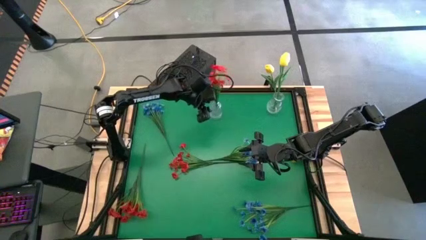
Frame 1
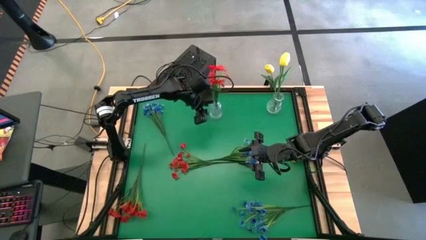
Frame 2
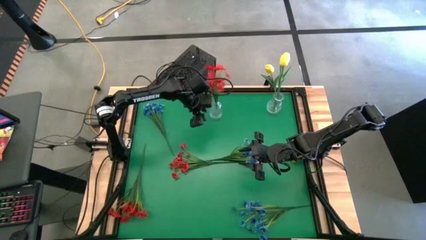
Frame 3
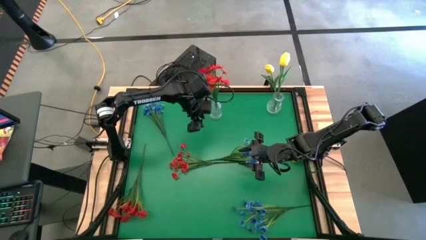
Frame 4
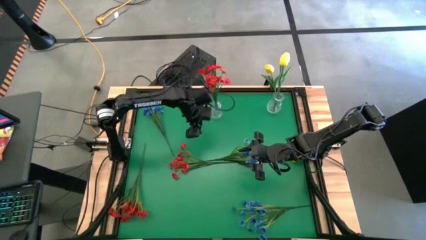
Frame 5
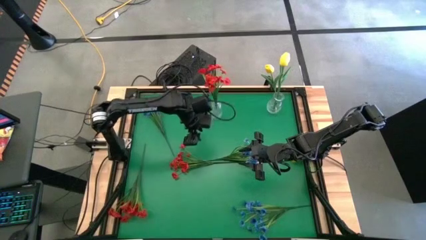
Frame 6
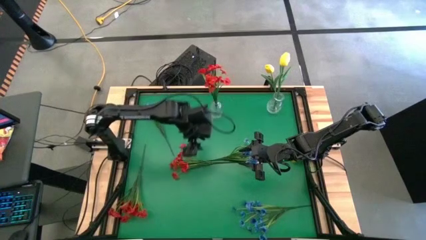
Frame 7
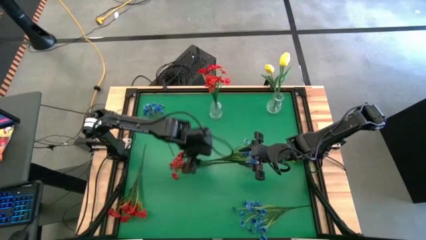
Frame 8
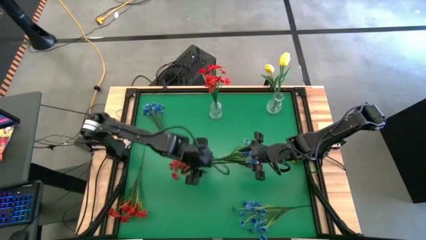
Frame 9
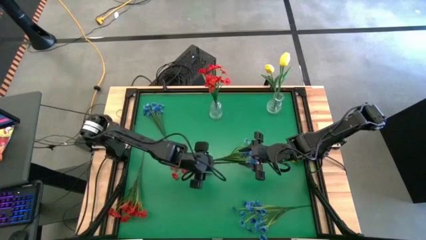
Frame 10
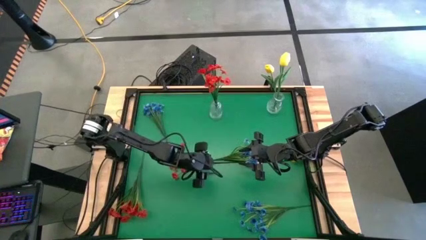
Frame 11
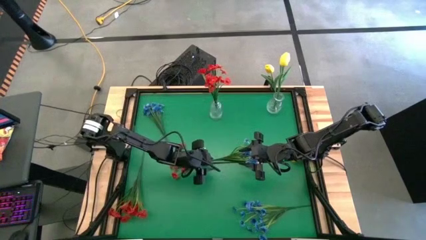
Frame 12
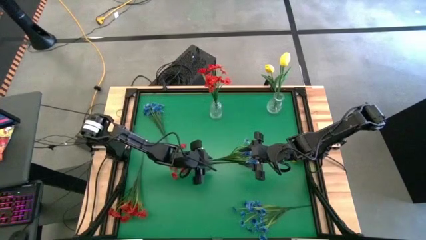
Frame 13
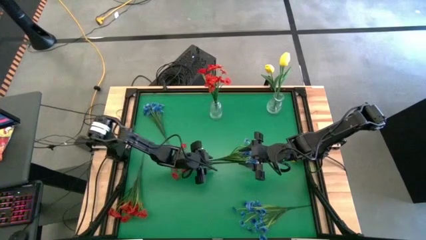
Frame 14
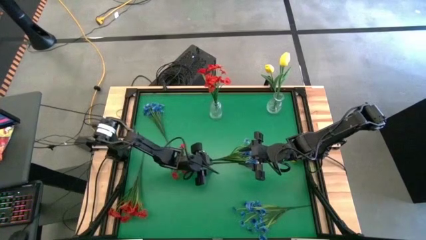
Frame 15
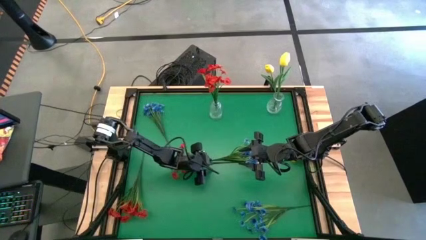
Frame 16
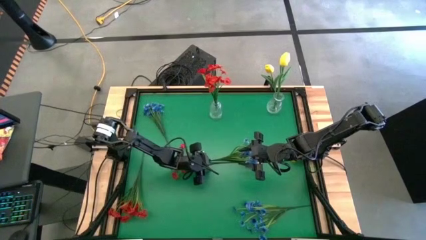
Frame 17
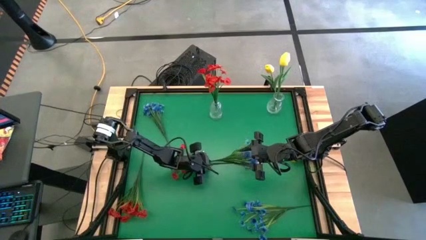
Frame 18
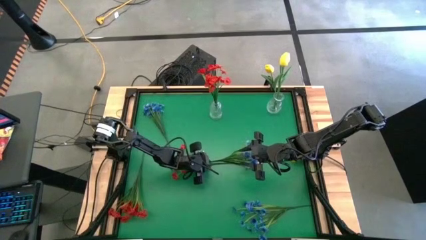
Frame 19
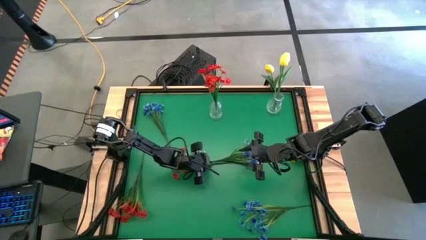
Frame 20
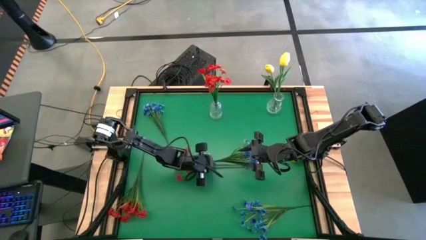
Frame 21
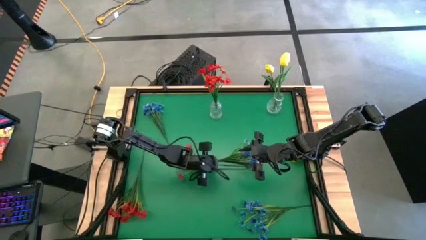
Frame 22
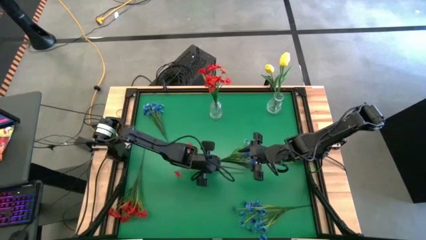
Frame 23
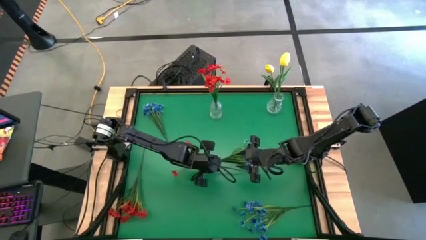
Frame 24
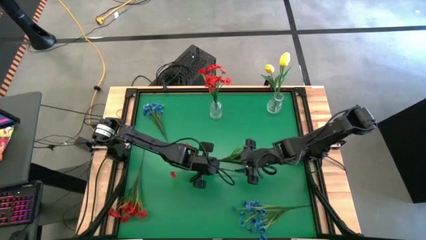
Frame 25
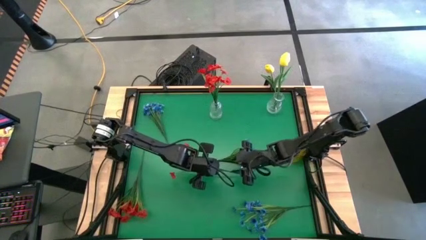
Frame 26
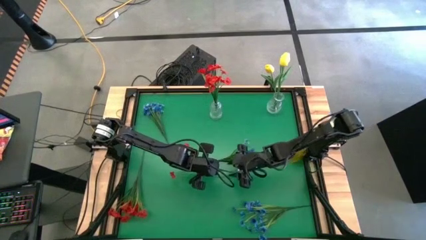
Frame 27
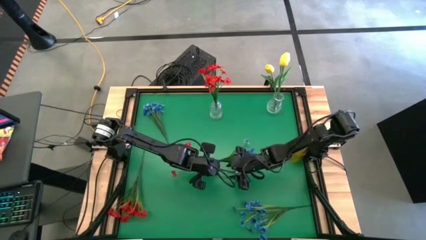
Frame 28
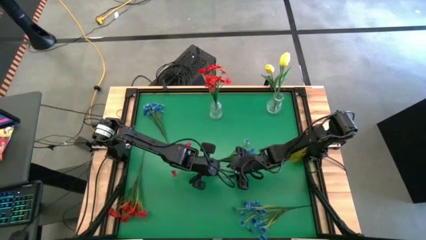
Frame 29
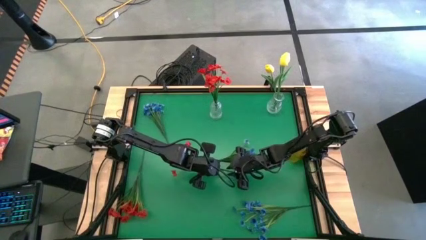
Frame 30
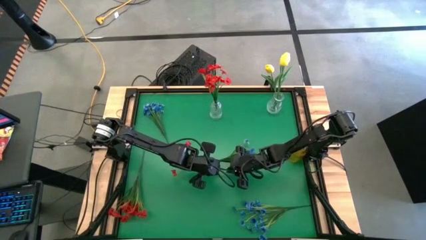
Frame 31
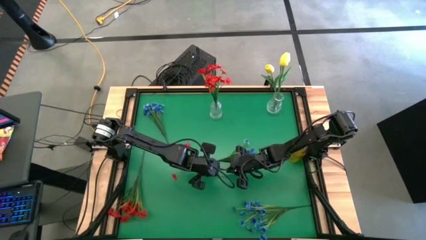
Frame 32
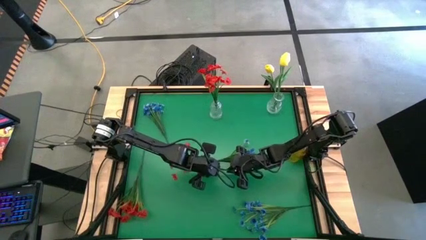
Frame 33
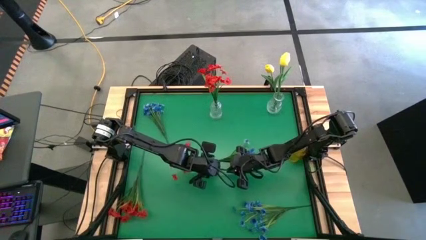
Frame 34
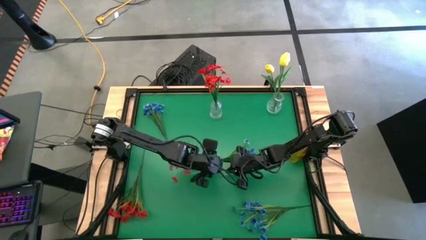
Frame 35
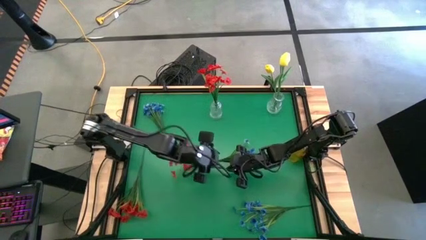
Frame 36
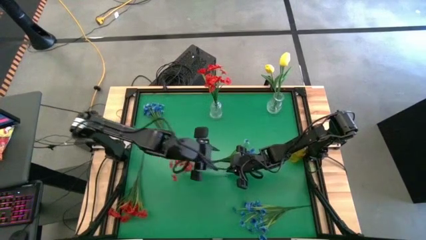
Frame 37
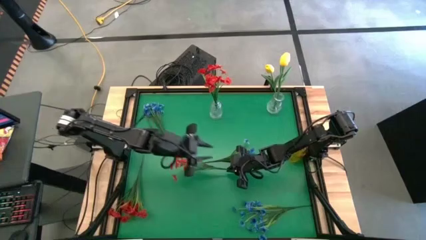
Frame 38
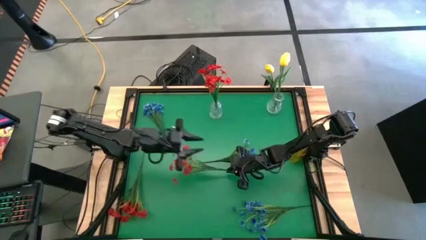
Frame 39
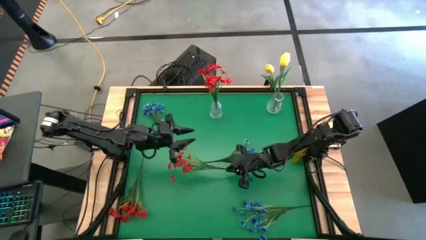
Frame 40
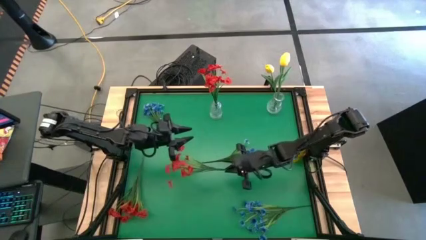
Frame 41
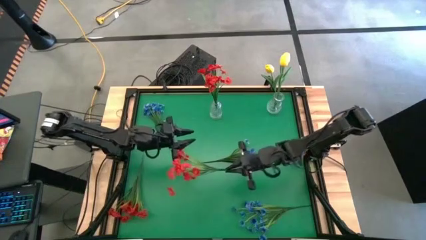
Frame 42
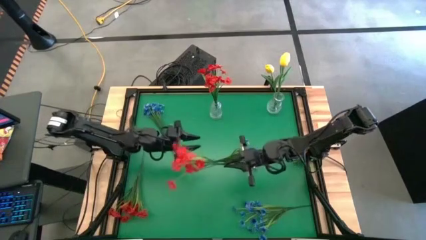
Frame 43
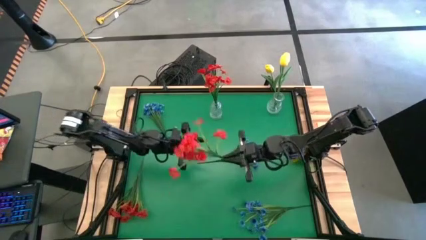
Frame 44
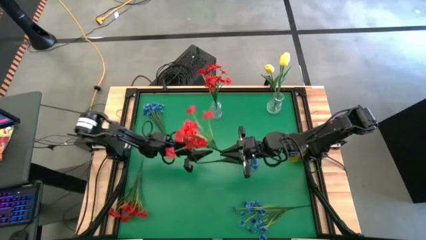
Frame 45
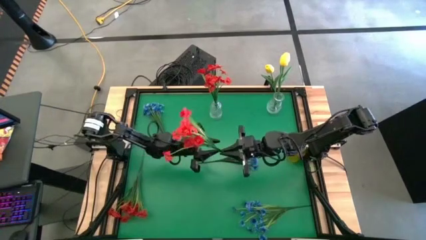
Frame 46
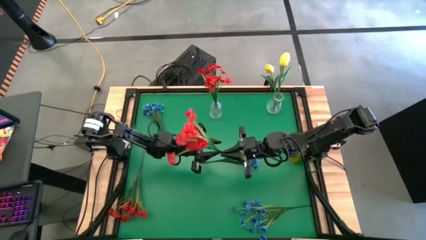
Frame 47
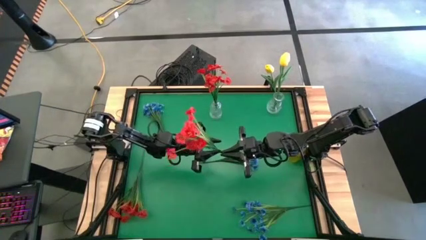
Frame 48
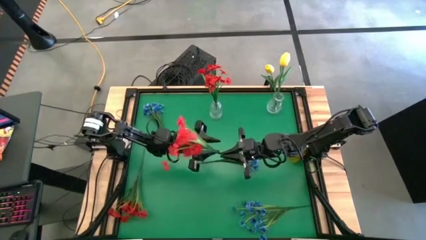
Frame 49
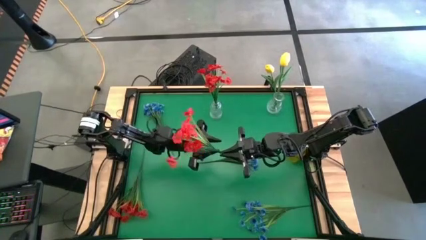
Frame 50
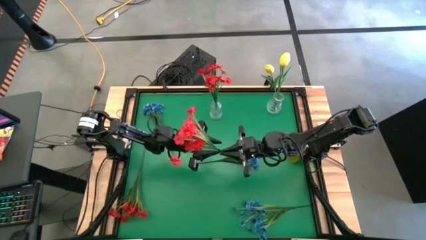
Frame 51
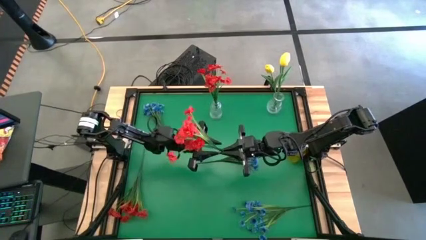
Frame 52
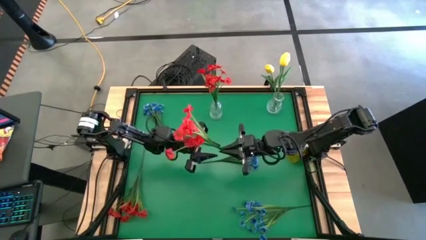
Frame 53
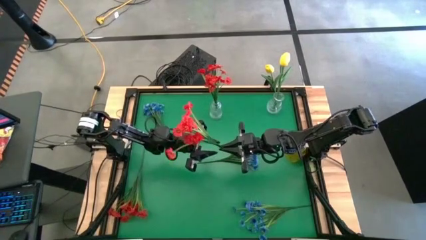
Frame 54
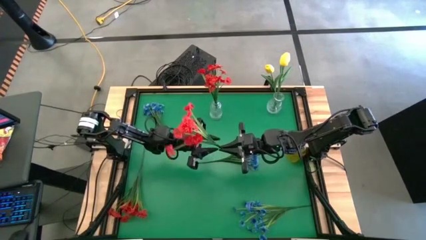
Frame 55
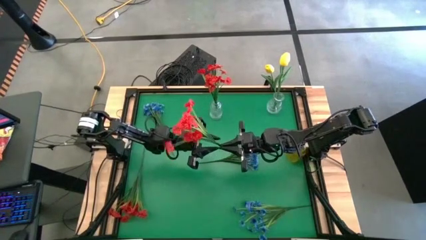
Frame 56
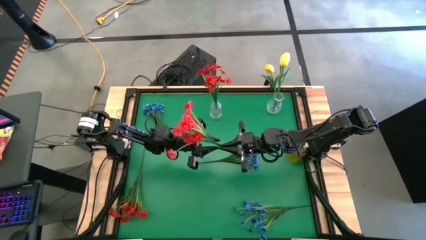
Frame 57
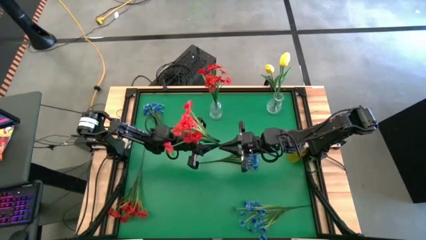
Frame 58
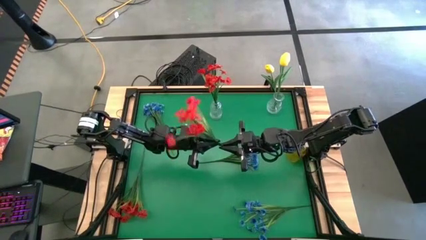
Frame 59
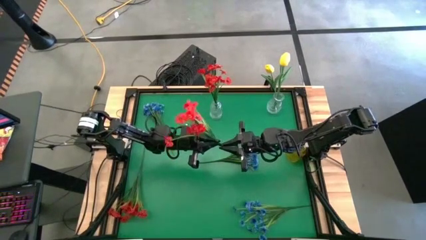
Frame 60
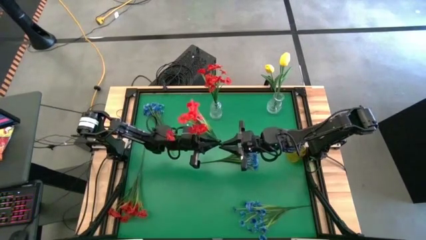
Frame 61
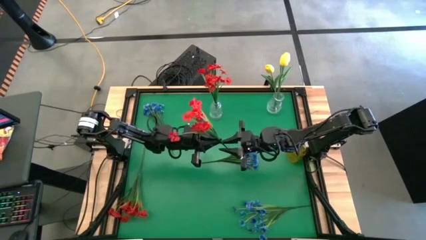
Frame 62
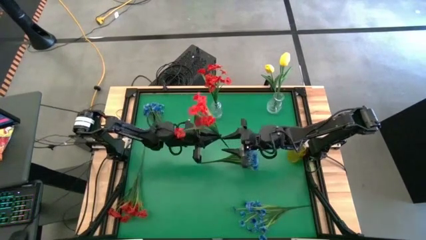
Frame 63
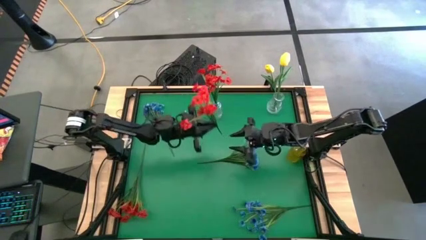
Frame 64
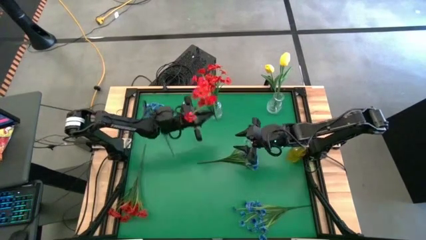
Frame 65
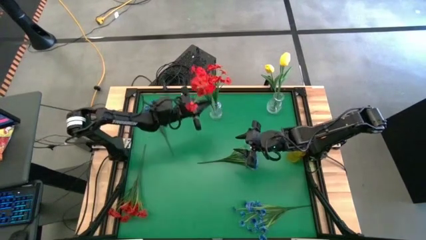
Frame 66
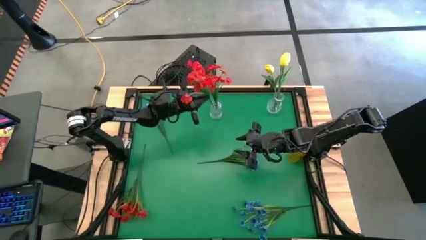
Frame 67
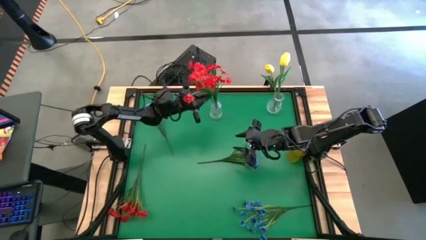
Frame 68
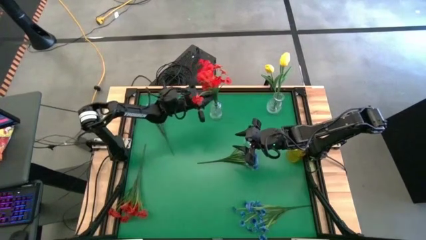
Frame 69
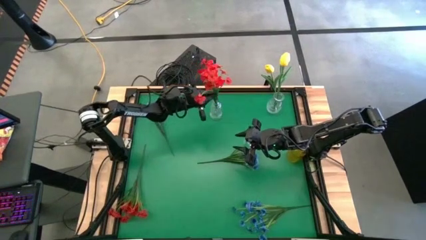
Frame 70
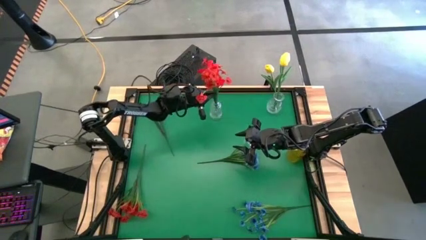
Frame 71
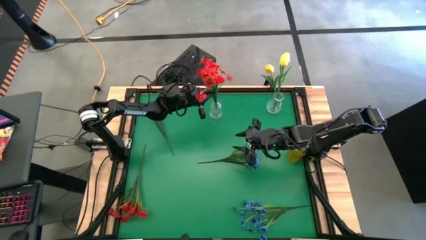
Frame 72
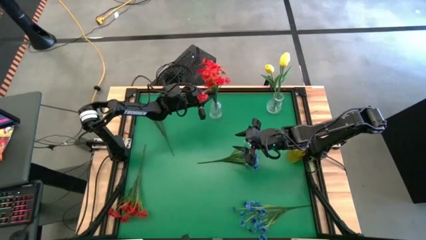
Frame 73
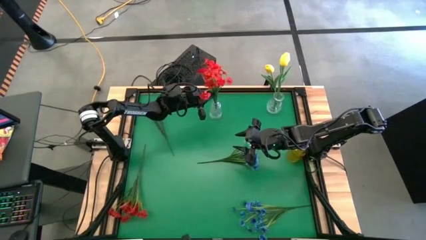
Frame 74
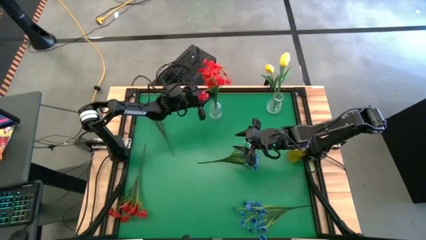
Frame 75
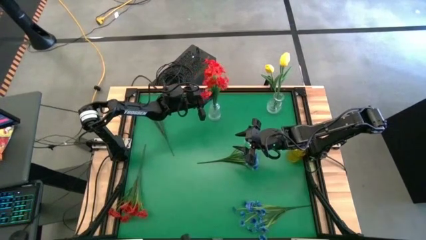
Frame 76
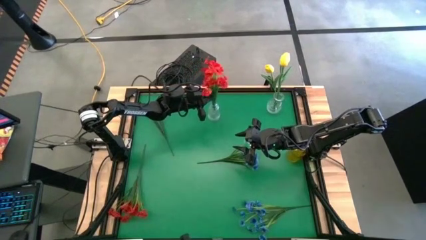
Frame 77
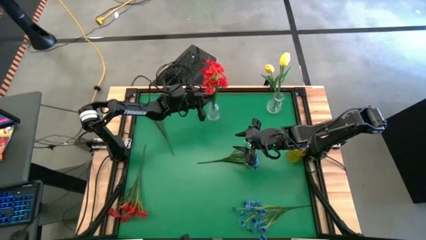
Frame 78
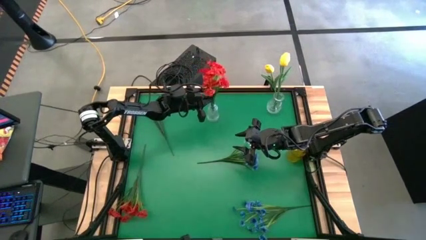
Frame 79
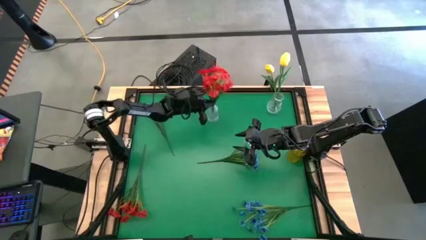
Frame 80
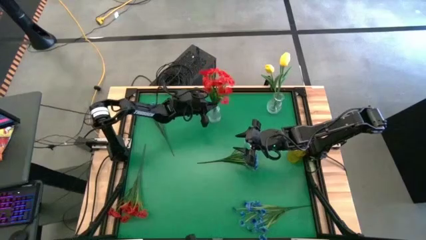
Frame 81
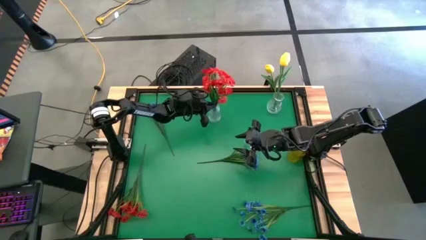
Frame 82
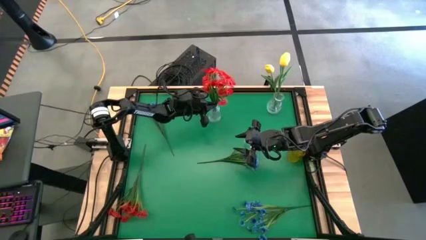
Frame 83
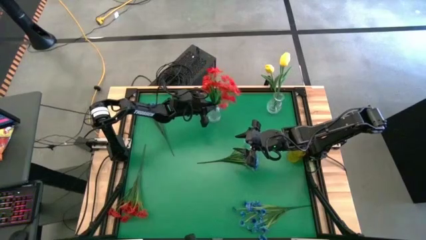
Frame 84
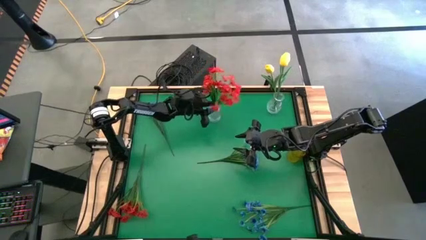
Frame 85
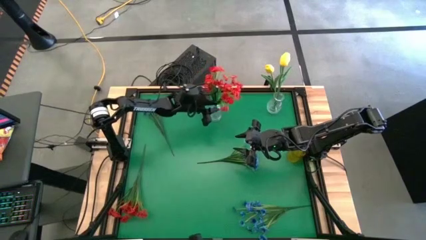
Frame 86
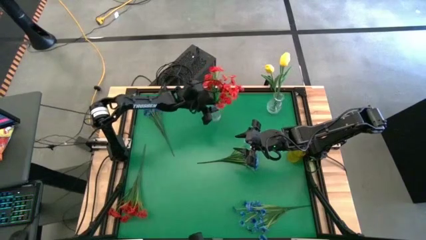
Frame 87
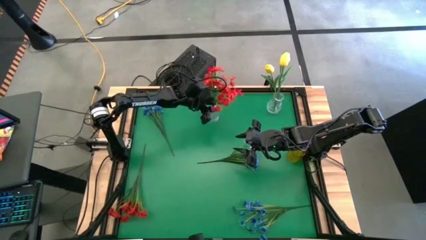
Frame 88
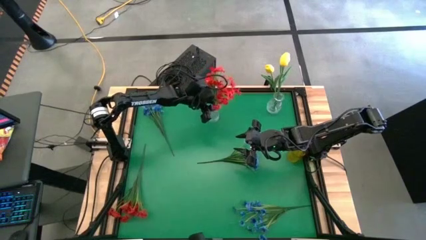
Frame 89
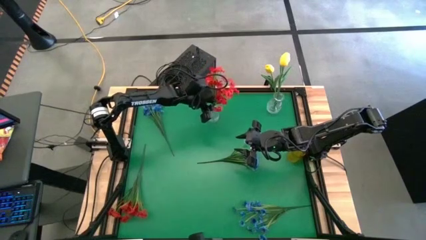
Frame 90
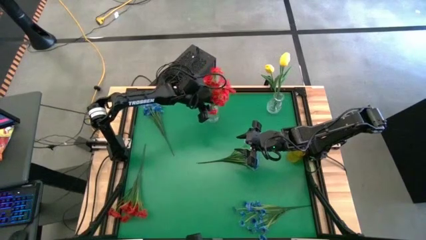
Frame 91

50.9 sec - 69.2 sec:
Task: Sort flowers into vase by color
Put the top red flowers into the left white transparent vase
